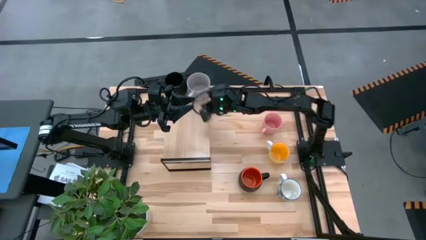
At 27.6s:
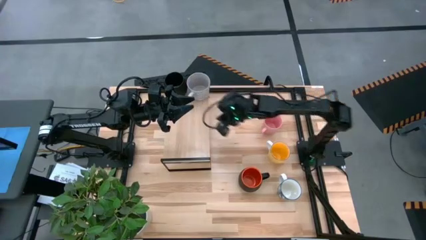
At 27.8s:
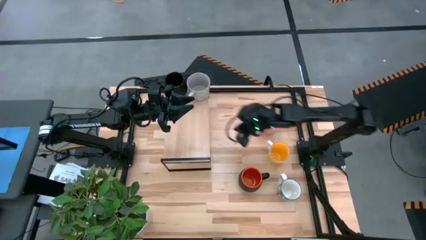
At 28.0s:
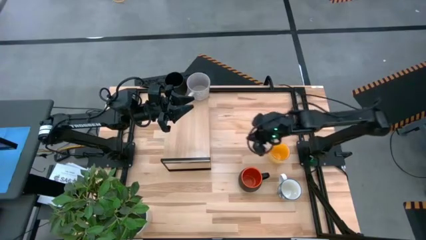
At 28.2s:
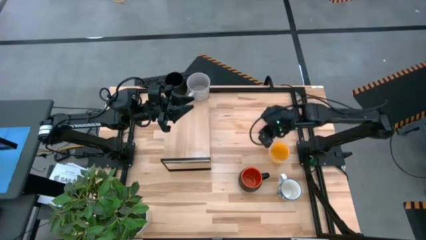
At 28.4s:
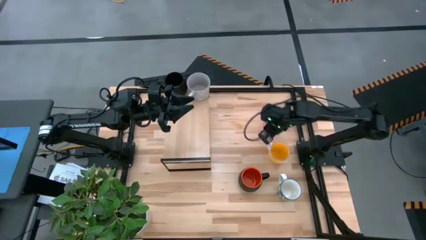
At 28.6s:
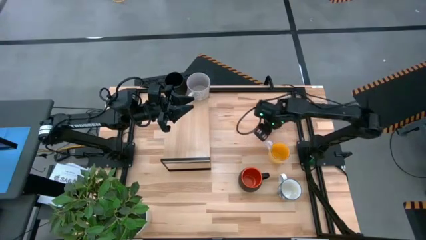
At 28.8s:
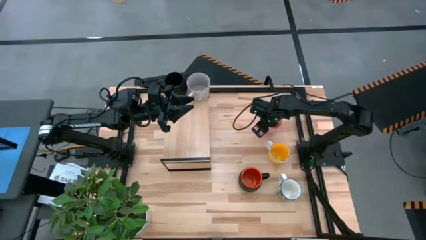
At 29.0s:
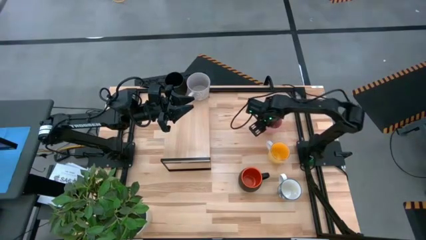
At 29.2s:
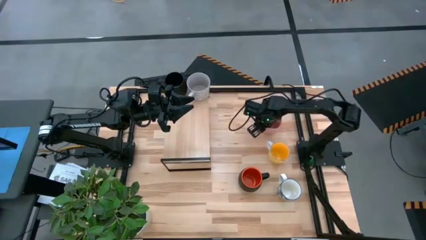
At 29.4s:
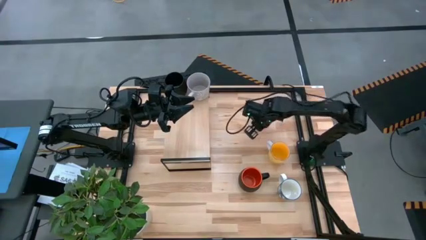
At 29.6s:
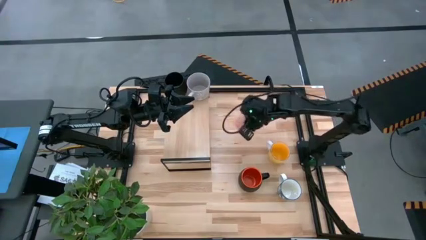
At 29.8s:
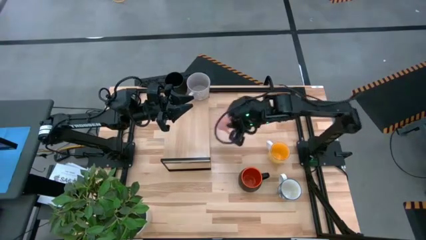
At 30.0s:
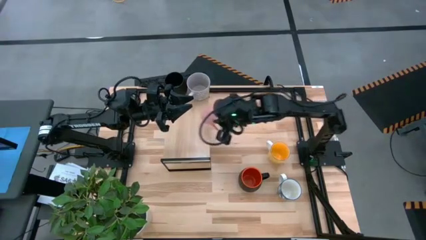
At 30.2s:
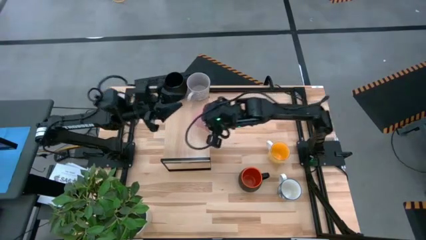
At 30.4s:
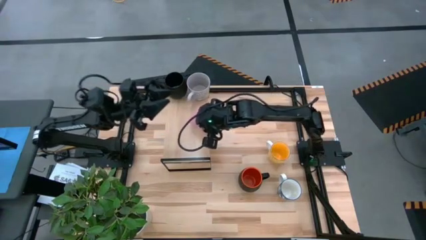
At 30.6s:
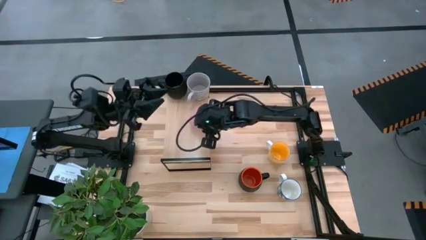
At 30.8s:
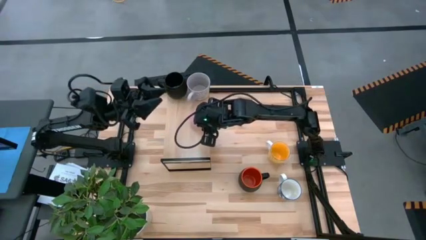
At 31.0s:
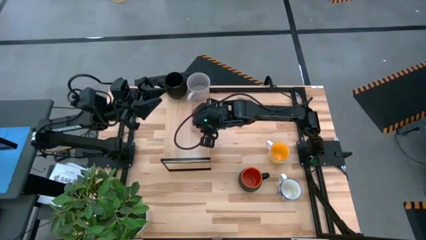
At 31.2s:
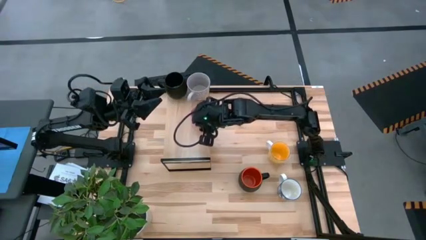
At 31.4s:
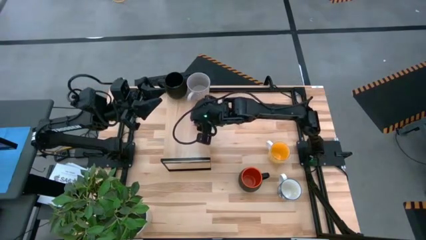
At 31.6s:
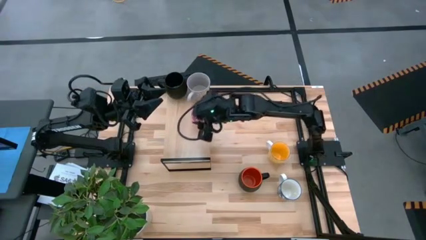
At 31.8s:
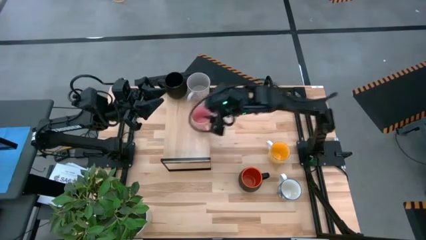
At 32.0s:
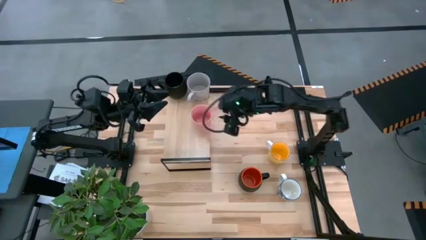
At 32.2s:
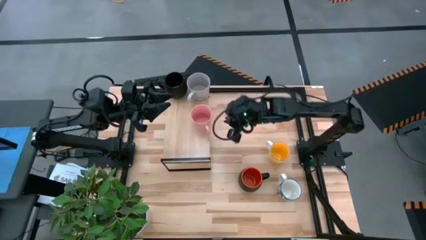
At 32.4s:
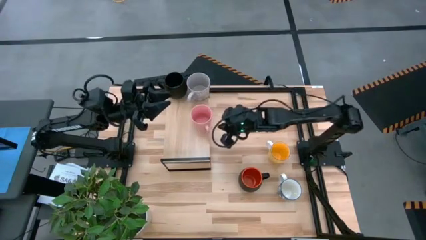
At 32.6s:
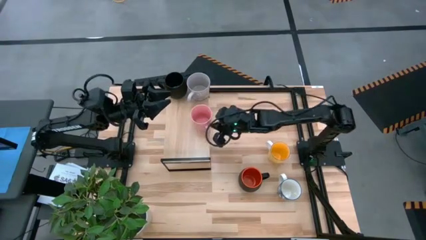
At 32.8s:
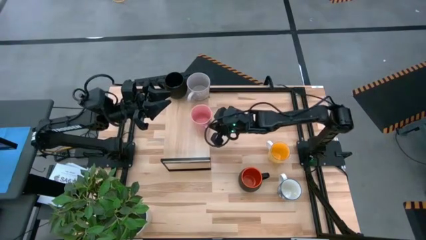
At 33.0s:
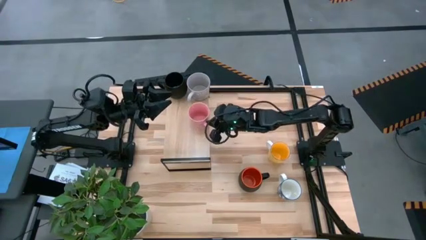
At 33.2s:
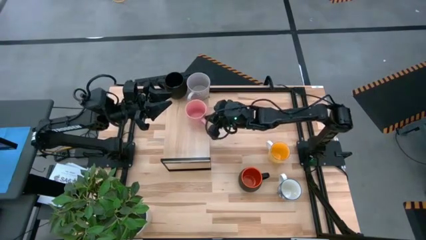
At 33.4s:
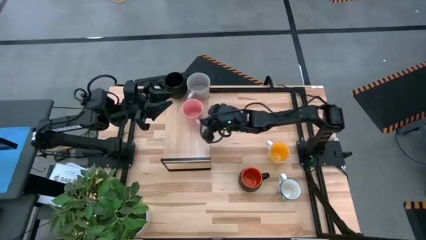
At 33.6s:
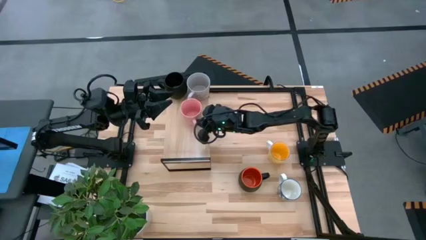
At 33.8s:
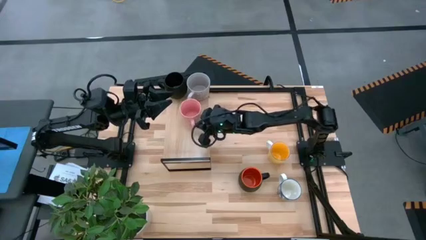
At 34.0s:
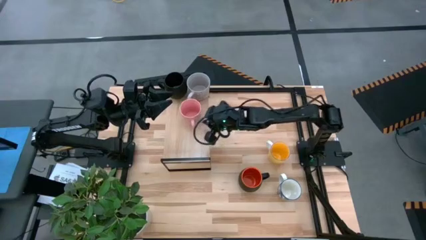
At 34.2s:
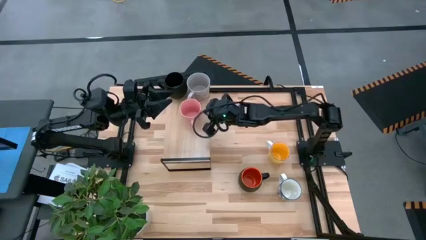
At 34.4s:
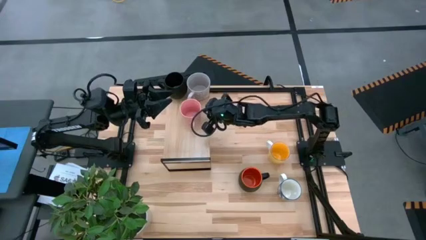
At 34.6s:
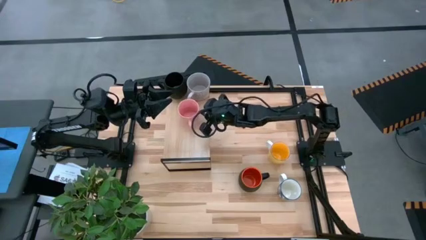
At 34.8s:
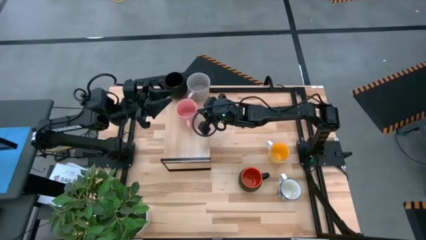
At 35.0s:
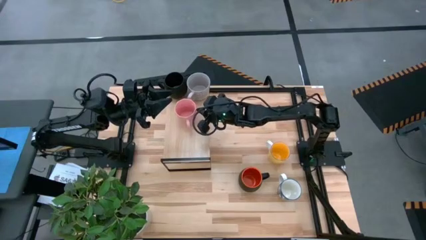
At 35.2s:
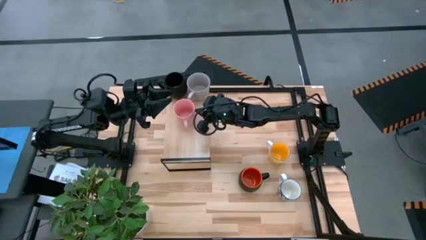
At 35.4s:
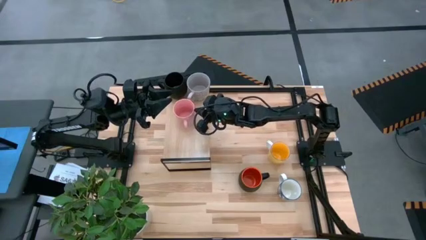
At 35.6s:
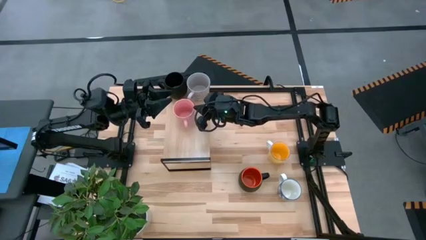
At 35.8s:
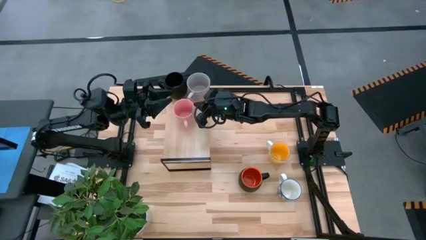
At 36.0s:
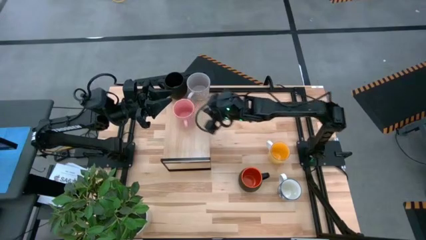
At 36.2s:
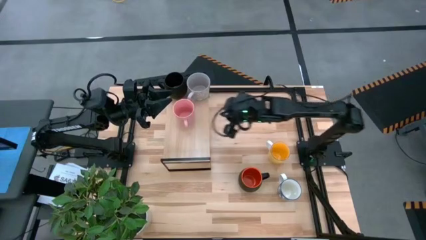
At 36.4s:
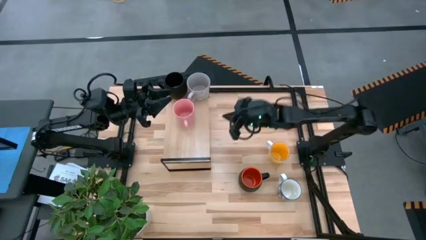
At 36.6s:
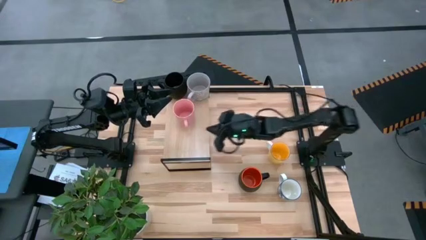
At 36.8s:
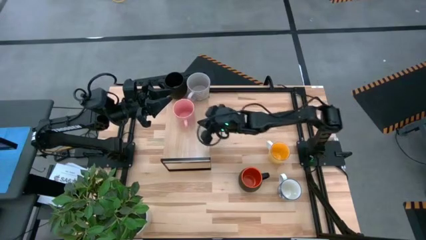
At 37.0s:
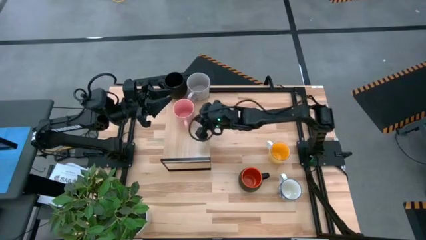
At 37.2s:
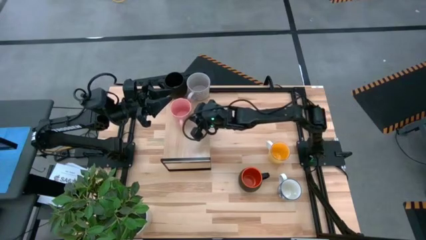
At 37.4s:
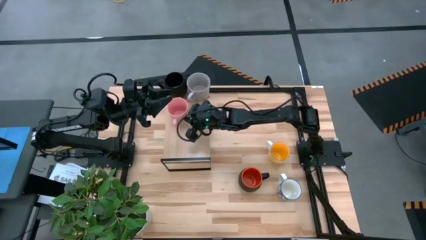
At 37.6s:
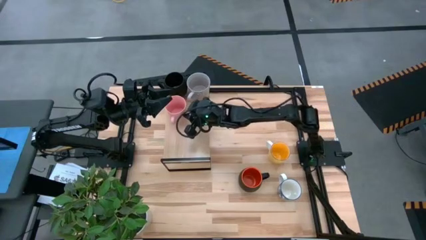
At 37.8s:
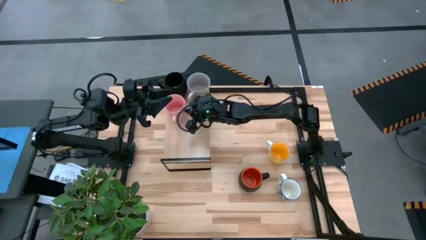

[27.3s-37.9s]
Task: Place coffee mugs
Put the pink mug on the shelf

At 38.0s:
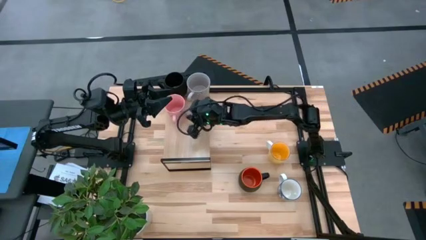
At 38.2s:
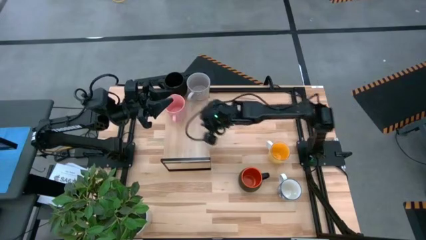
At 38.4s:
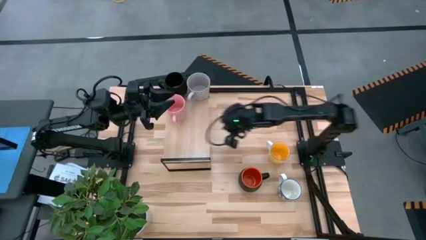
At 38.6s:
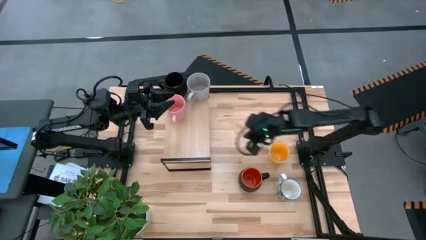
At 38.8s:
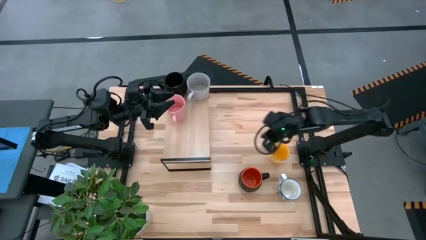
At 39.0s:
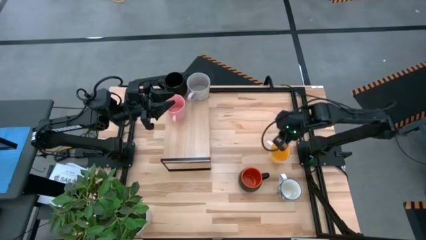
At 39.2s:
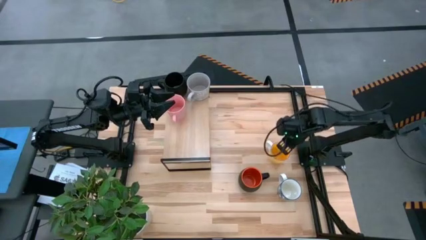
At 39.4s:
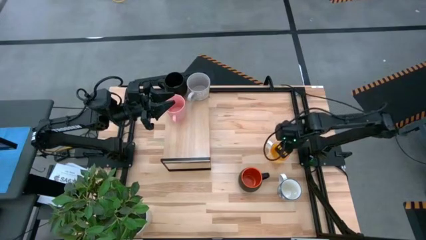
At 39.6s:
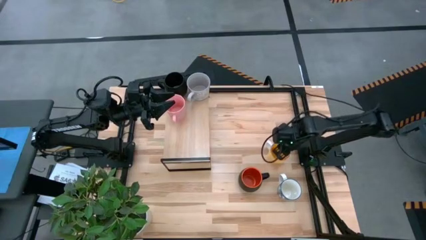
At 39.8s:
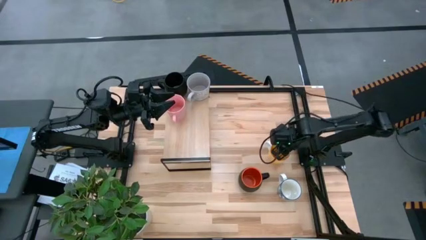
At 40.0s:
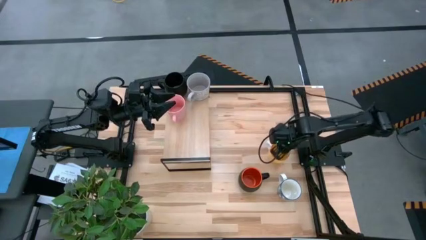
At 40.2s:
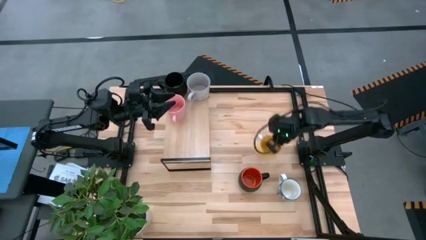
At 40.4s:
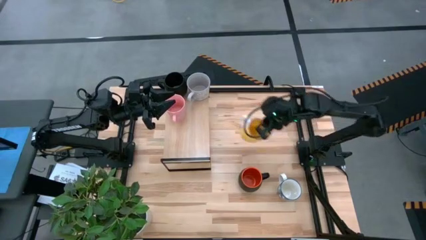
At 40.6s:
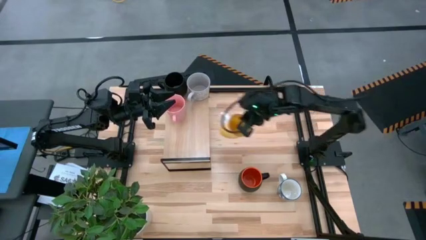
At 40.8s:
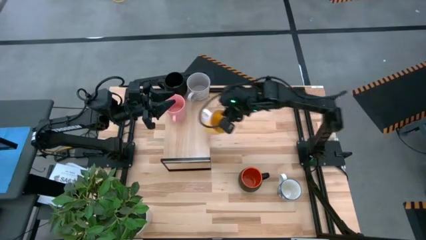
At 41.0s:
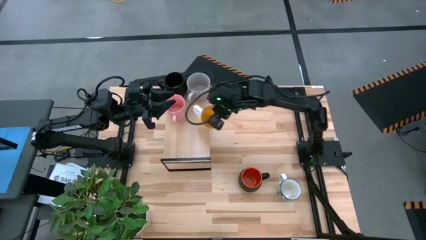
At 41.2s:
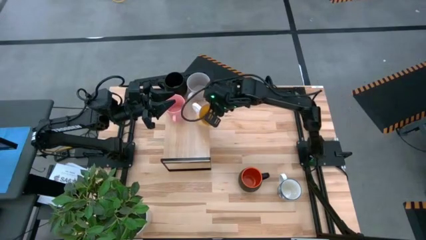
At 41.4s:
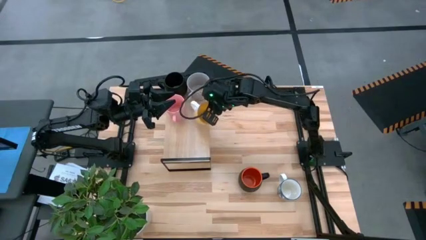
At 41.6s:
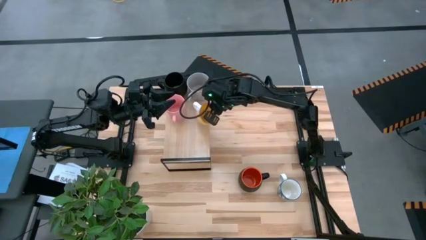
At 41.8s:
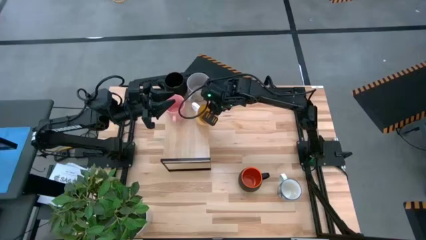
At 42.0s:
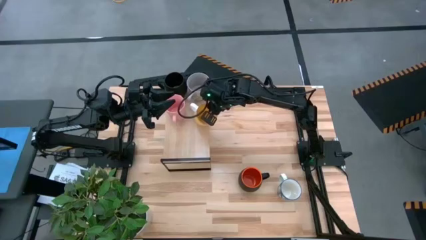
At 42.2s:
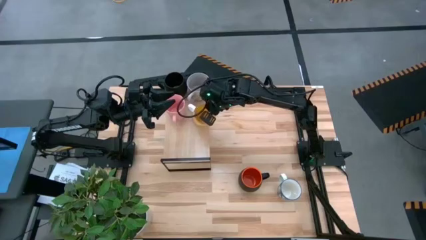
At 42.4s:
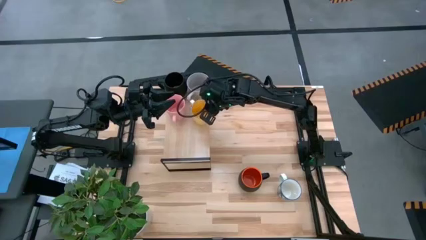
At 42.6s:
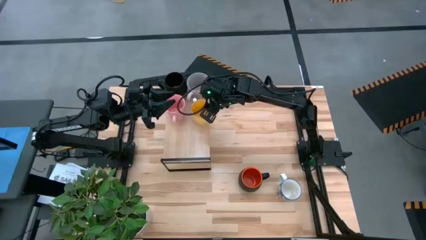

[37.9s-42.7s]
Put the yellow mug on the shelf
